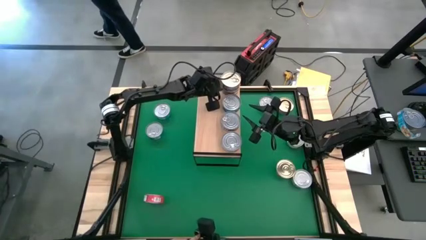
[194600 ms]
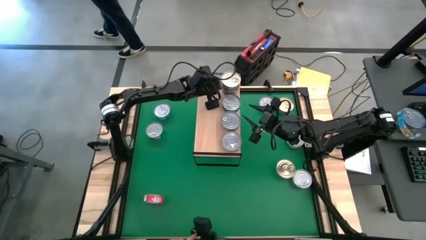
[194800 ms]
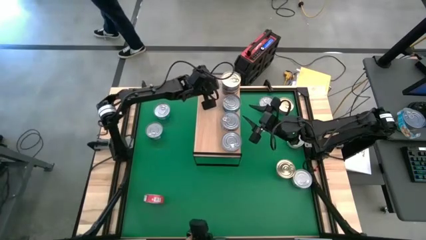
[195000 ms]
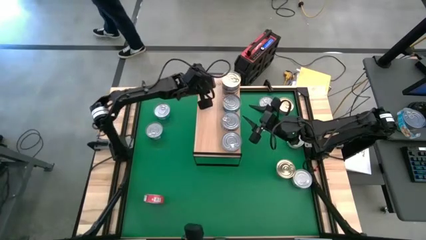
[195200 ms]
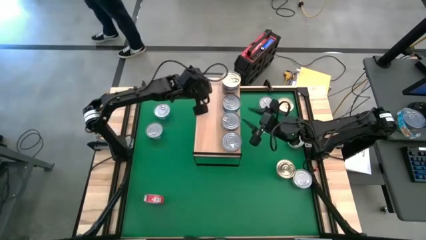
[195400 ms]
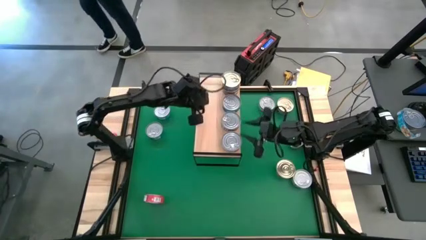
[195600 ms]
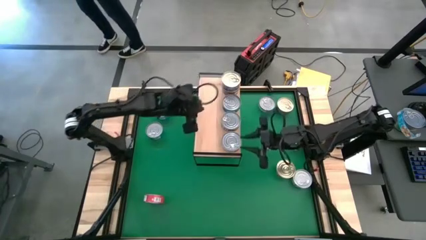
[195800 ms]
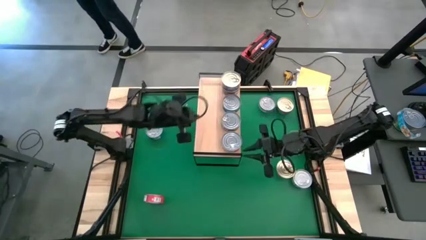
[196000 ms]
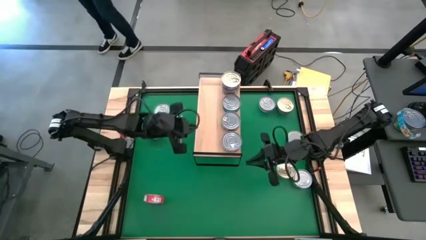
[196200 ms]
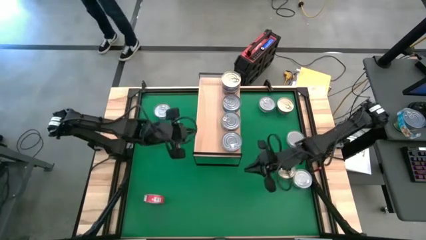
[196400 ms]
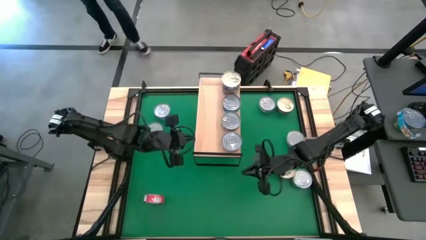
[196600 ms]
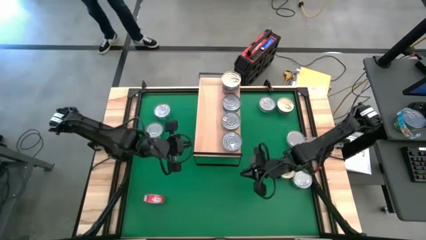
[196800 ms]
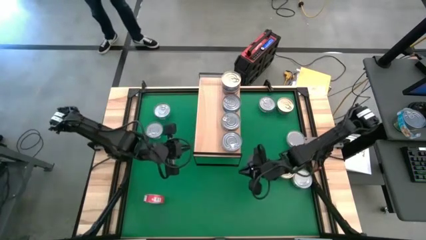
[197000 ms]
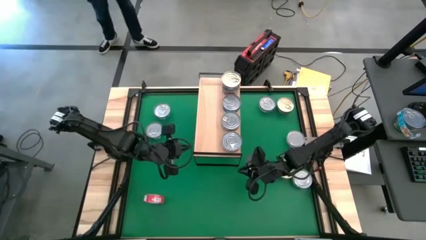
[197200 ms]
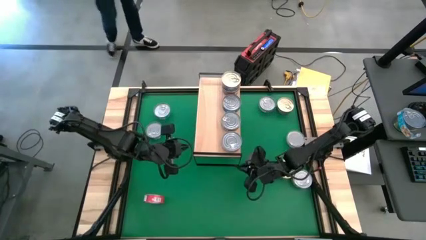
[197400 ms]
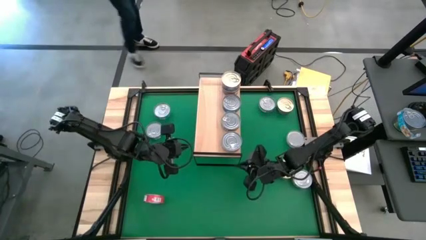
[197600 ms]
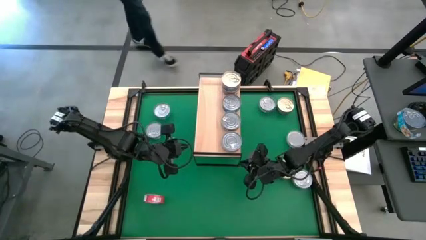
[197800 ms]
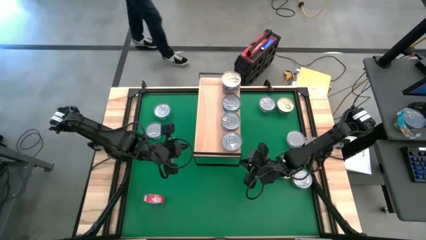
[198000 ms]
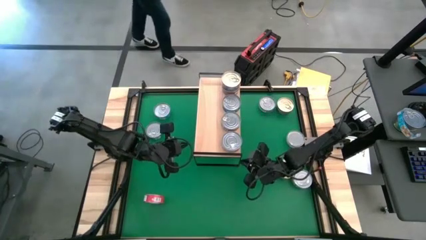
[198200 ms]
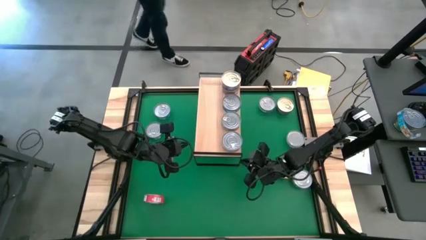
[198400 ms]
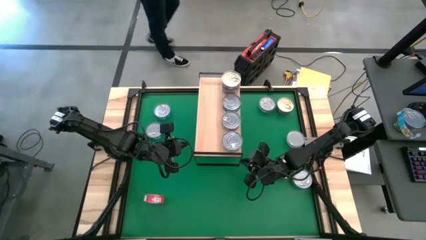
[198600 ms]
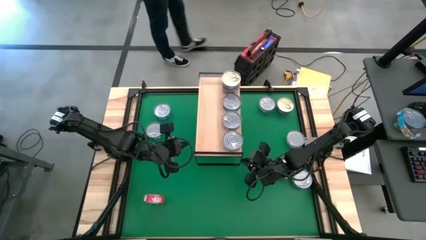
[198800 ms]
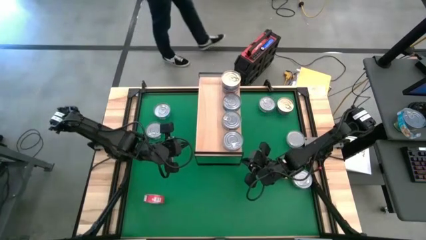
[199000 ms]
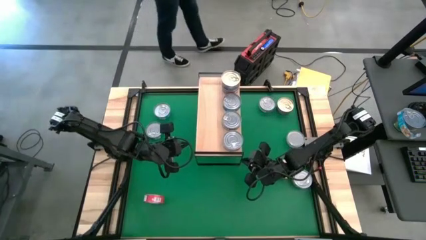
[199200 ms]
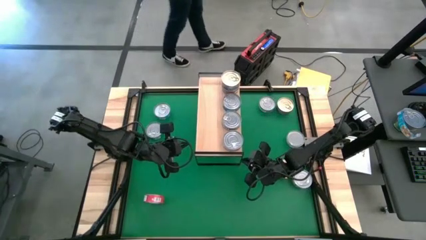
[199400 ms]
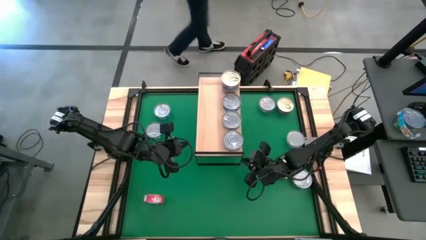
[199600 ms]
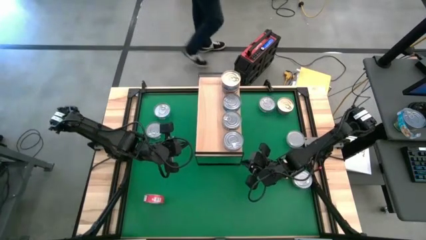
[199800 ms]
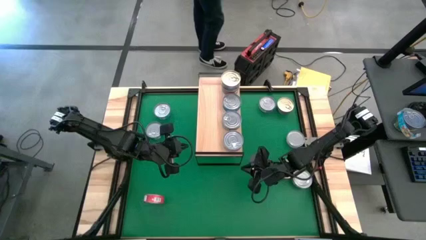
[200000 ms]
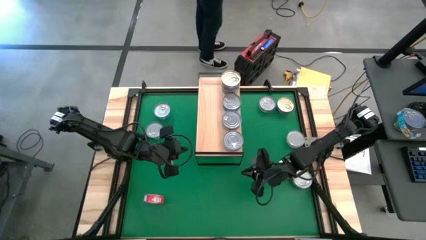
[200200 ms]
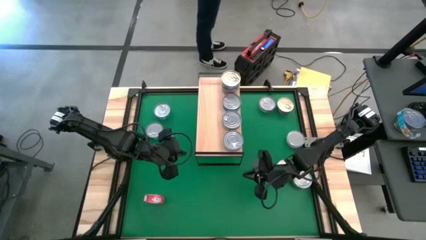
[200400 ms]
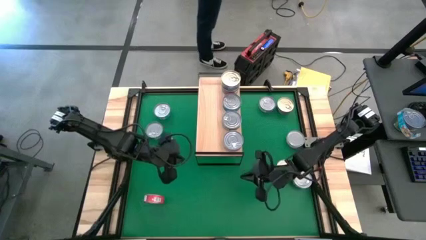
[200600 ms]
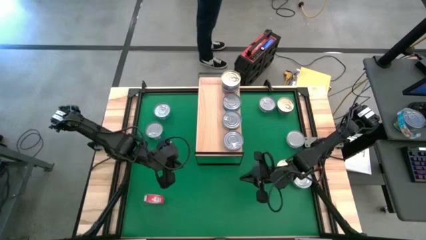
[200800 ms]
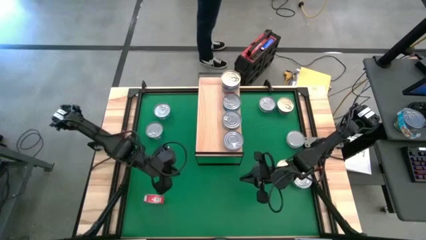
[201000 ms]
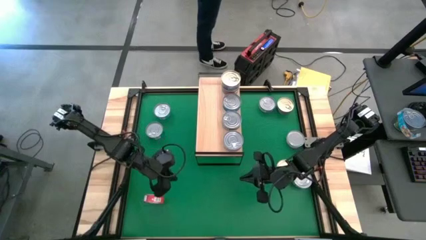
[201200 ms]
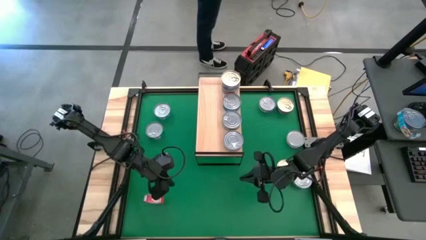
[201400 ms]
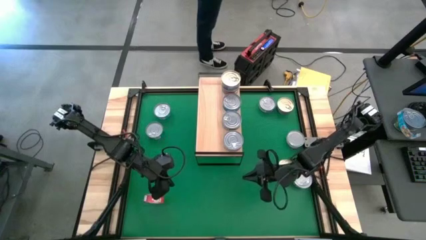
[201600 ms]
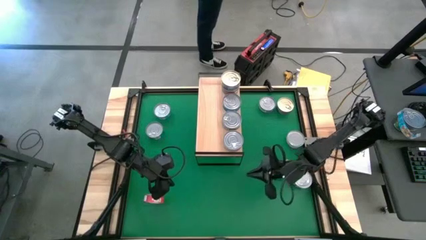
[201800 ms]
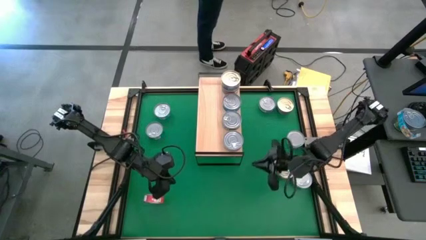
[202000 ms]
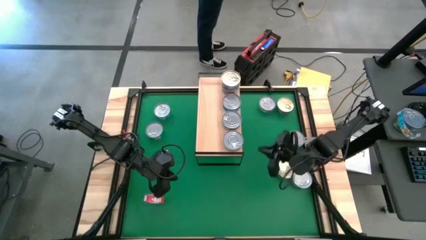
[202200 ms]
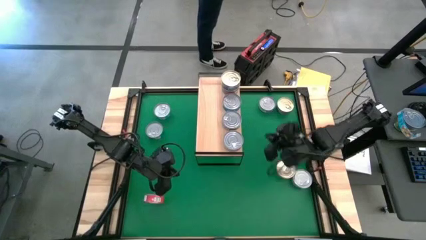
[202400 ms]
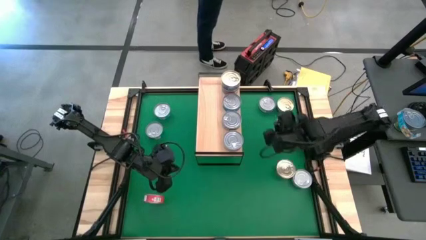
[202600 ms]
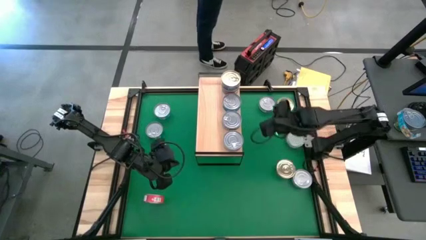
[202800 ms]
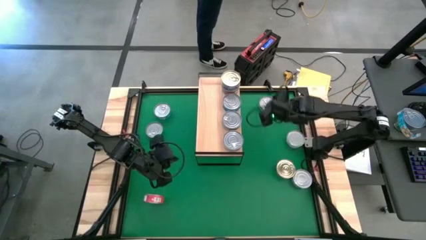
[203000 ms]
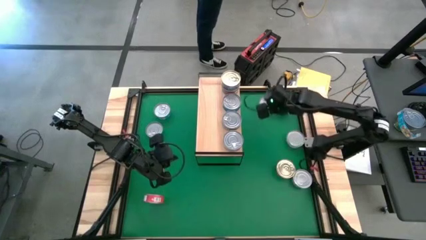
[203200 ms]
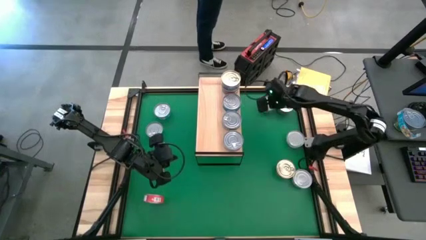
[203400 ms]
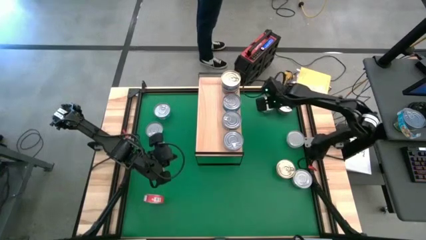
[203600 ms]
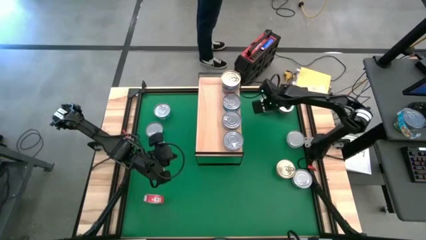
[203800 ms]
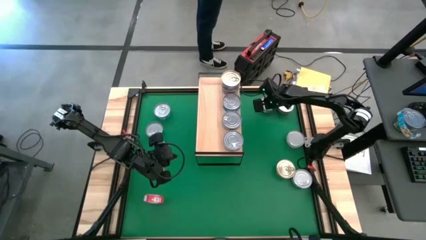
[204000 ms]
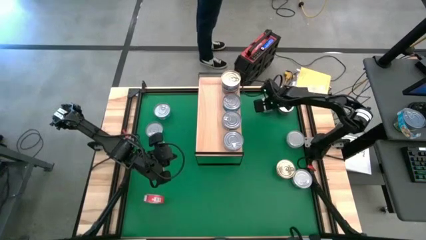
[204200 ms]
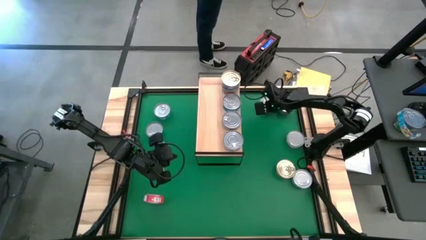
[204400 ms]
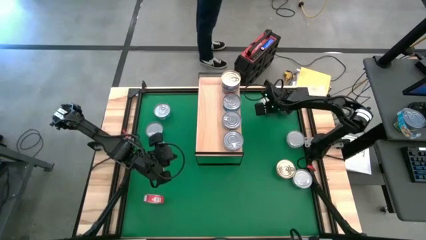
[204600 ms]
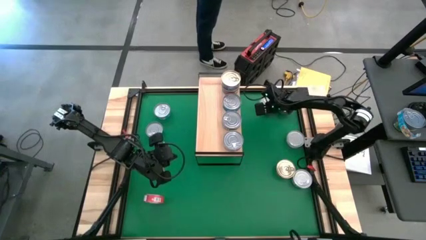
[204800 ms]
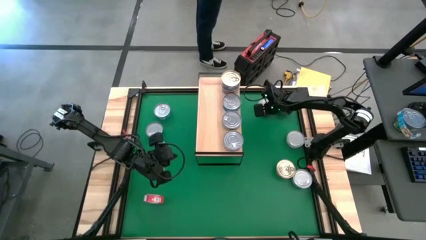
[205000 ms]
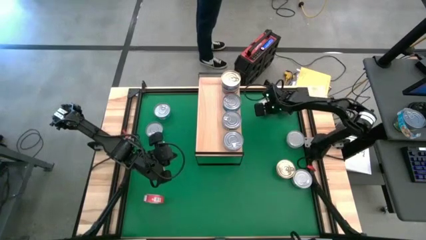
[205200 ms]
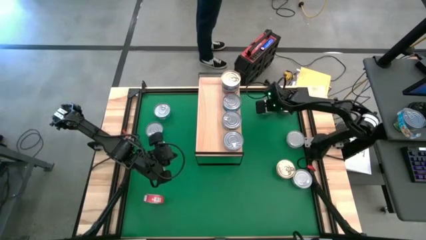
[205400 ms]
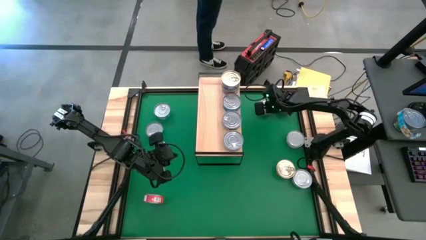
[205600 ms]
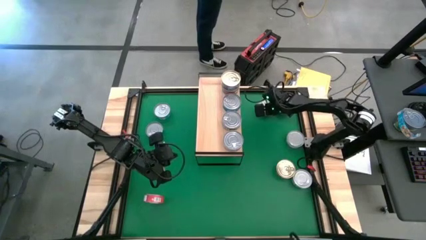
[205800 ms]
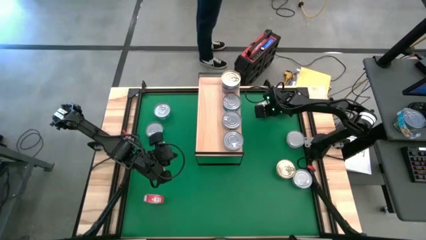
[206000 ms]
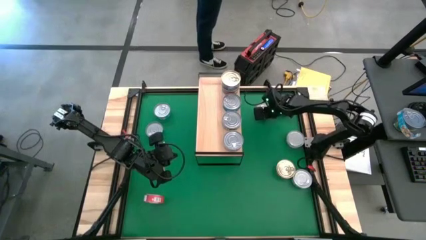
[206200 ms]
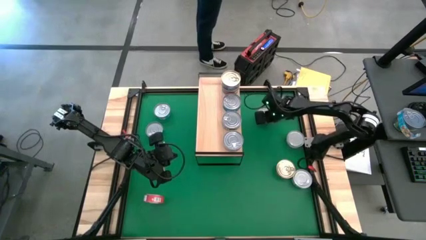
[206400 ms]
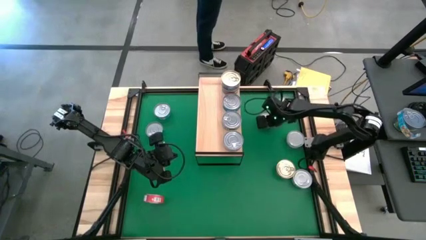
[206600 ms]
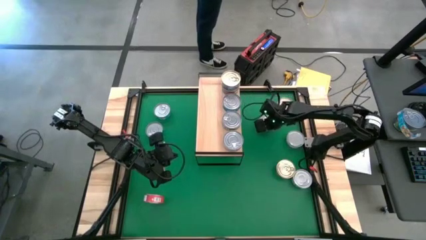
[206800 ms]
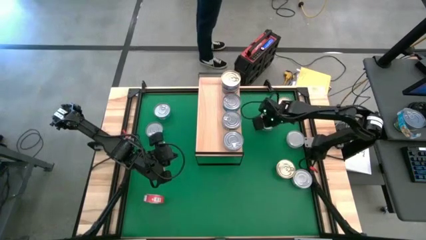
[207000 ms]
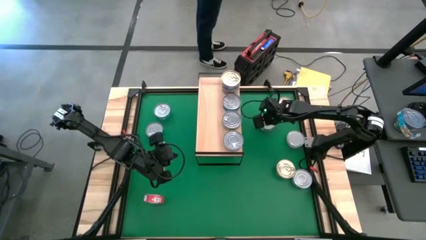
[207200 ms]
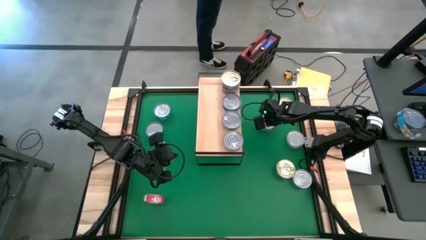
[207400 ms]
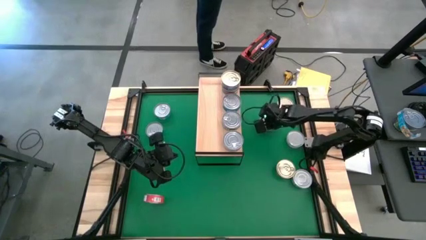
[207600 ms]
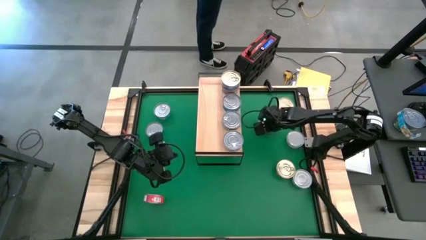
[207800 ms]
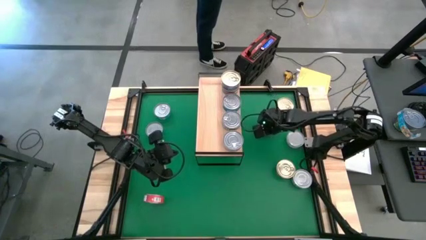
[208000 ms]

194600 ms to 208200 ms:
Task: Stack canned seafood by type on shelf
Put the top blue tuna can on the shelf
